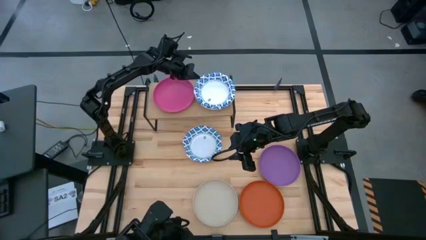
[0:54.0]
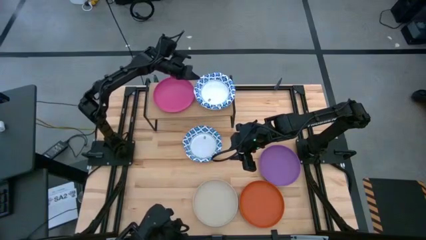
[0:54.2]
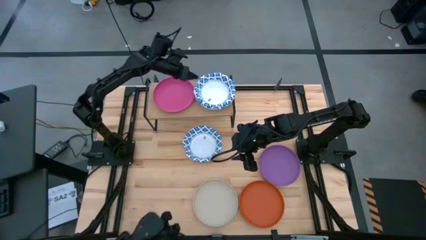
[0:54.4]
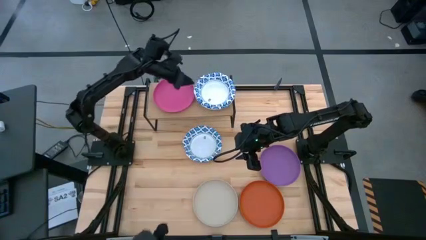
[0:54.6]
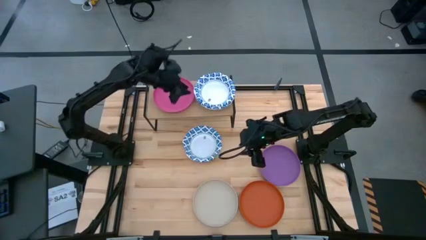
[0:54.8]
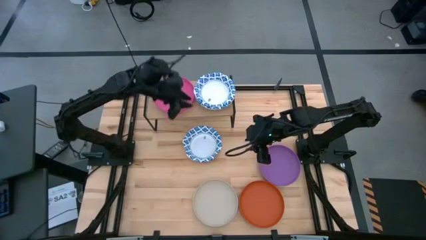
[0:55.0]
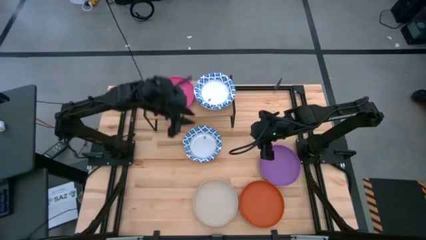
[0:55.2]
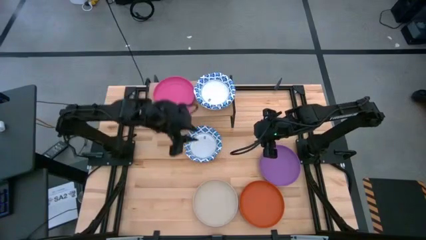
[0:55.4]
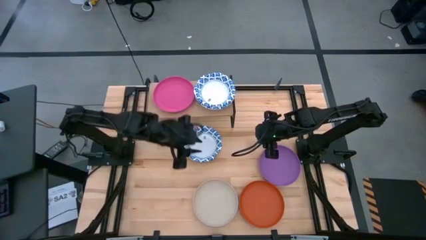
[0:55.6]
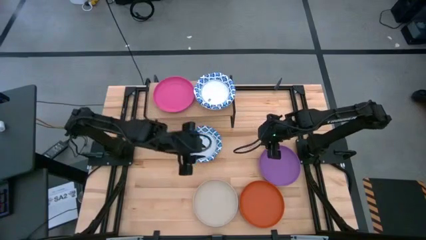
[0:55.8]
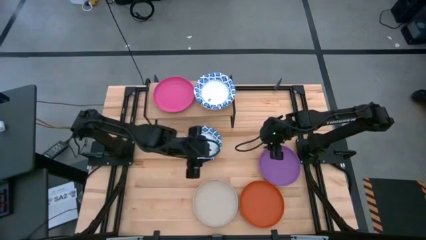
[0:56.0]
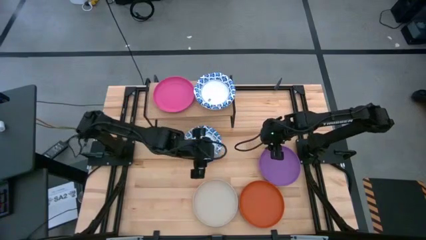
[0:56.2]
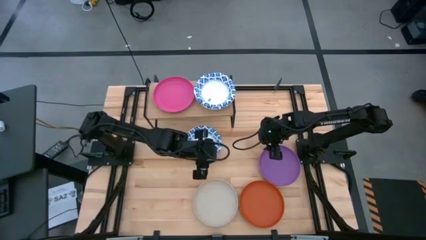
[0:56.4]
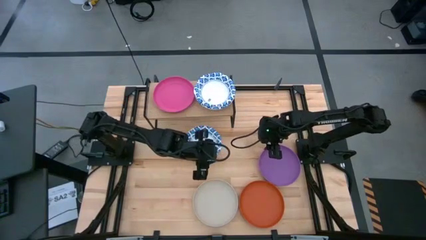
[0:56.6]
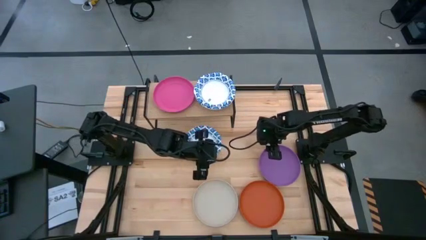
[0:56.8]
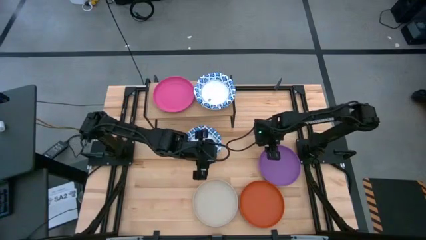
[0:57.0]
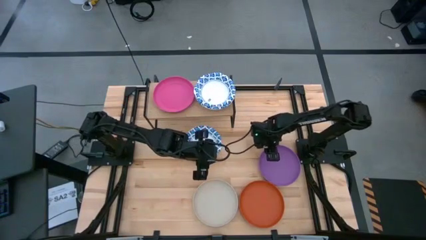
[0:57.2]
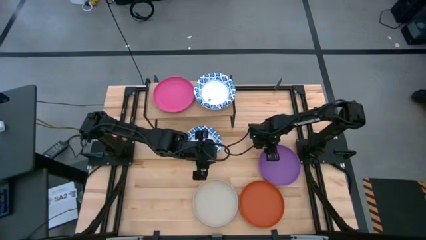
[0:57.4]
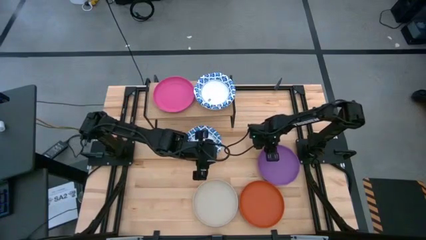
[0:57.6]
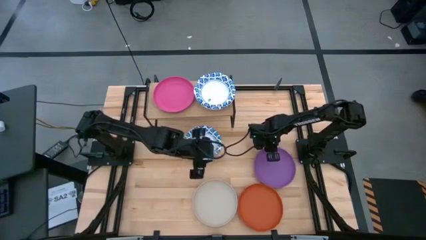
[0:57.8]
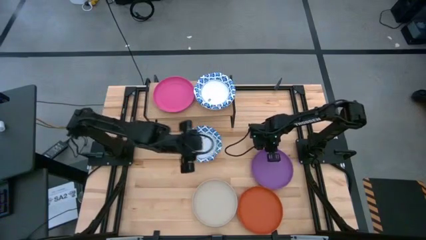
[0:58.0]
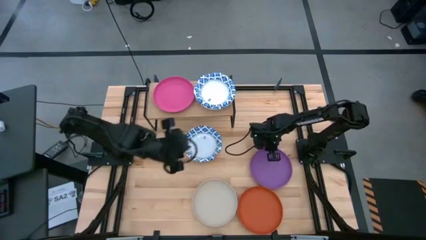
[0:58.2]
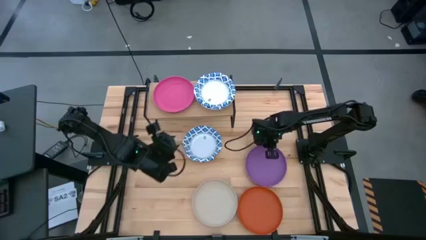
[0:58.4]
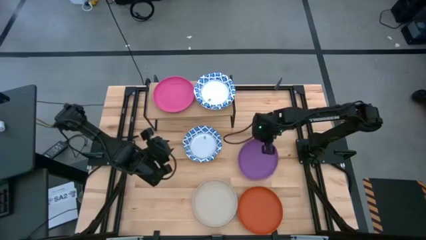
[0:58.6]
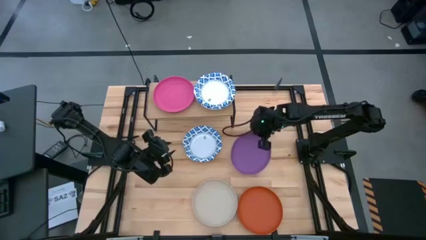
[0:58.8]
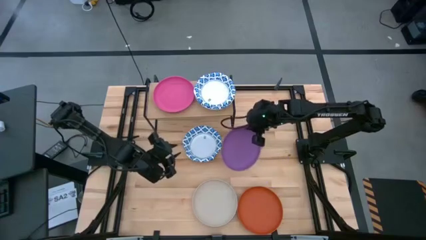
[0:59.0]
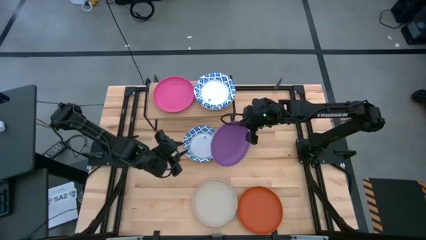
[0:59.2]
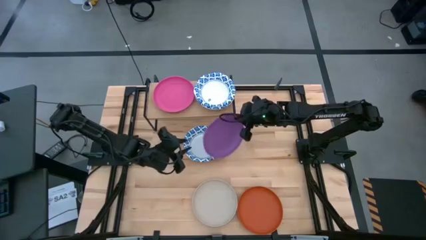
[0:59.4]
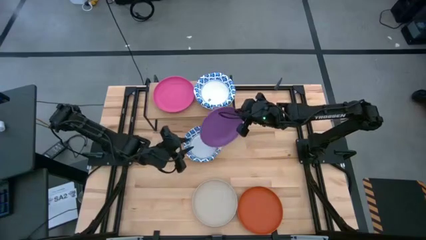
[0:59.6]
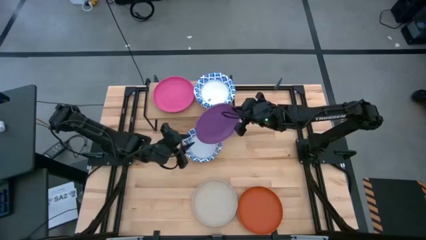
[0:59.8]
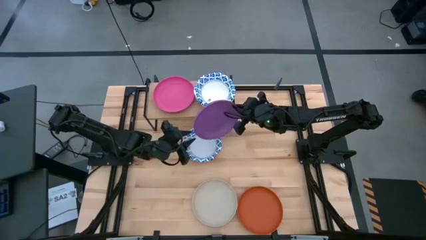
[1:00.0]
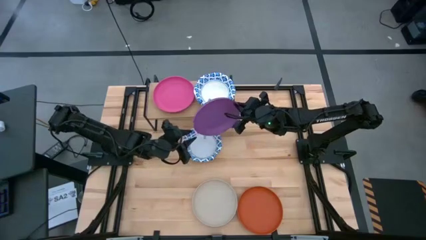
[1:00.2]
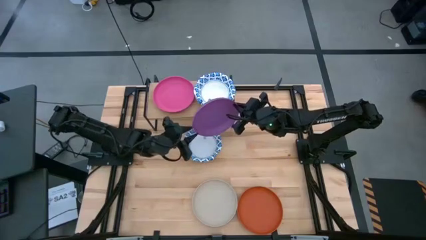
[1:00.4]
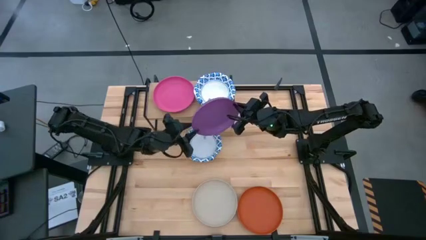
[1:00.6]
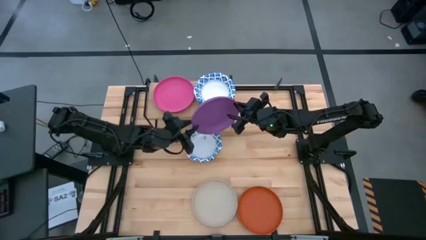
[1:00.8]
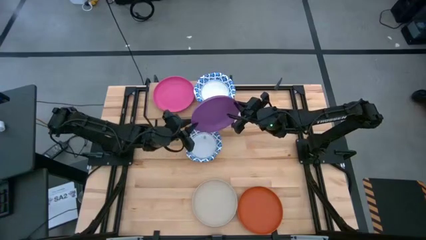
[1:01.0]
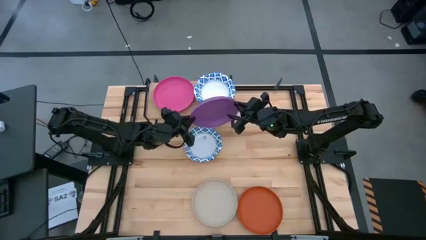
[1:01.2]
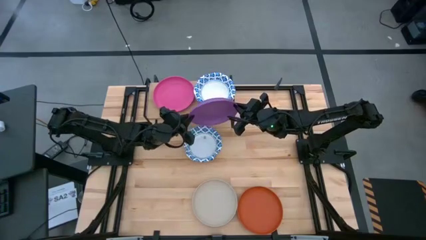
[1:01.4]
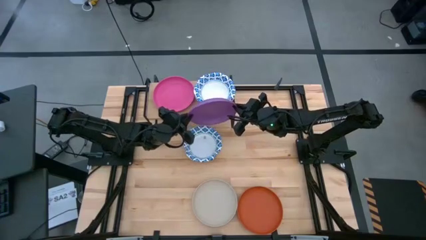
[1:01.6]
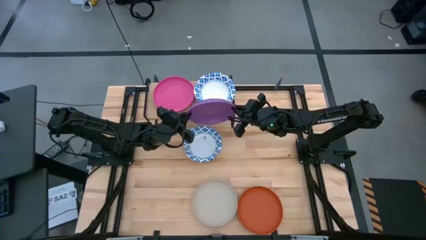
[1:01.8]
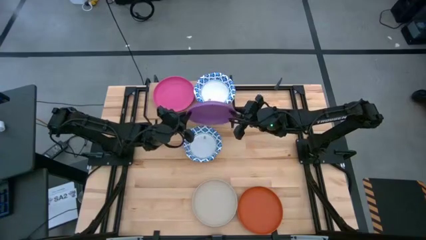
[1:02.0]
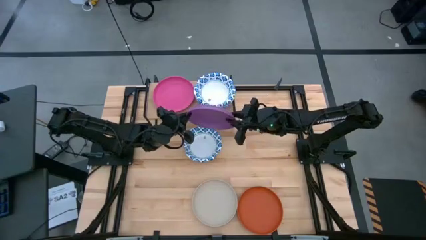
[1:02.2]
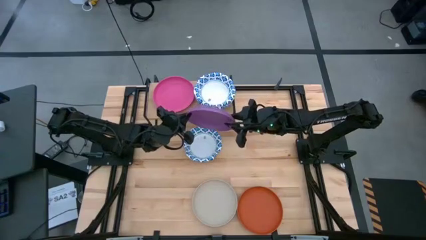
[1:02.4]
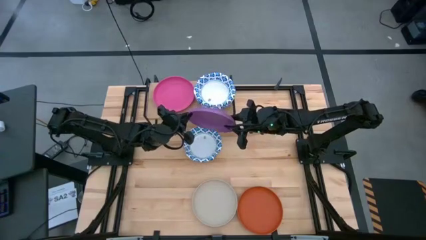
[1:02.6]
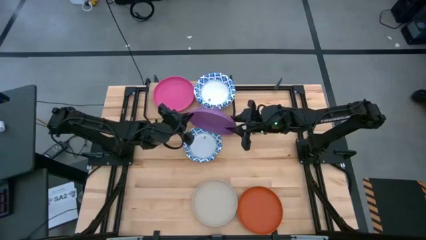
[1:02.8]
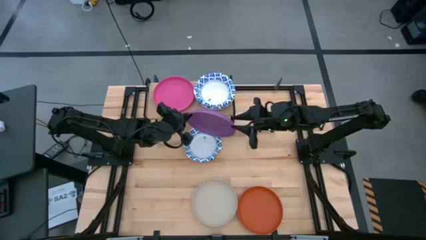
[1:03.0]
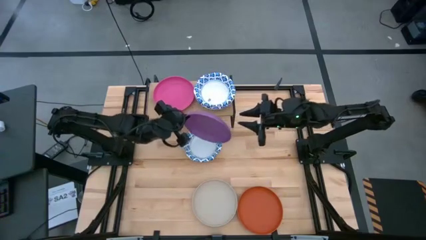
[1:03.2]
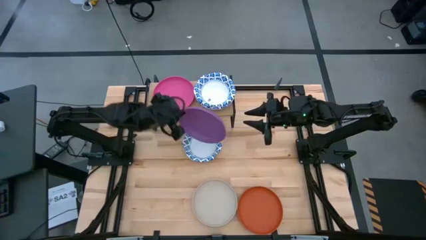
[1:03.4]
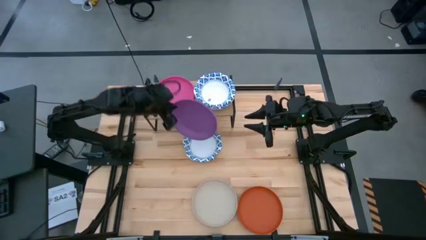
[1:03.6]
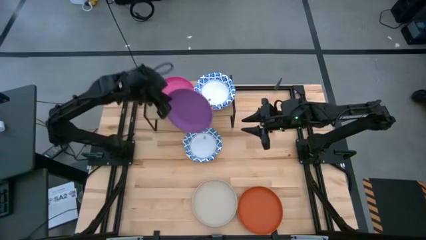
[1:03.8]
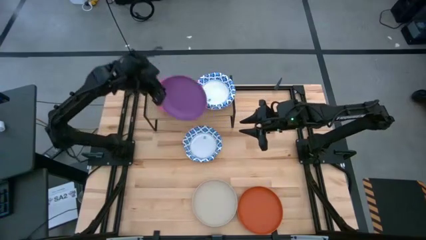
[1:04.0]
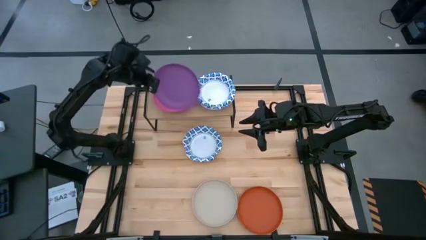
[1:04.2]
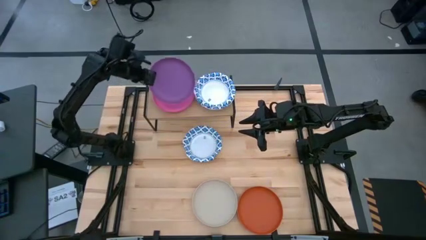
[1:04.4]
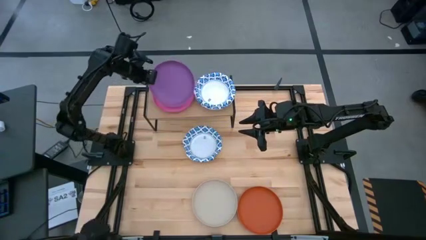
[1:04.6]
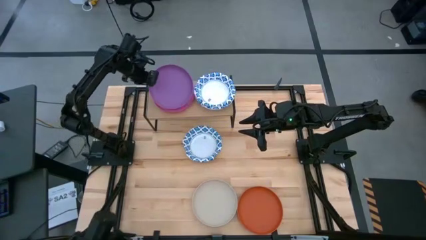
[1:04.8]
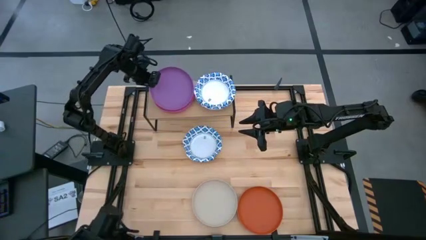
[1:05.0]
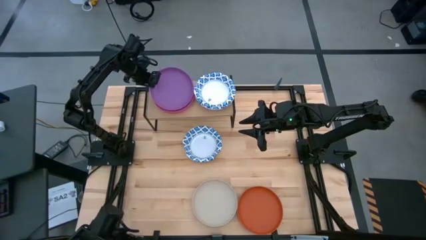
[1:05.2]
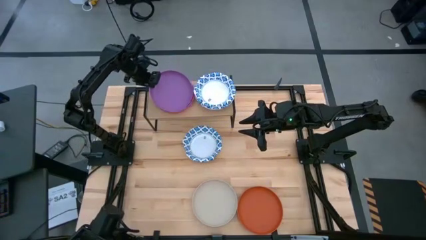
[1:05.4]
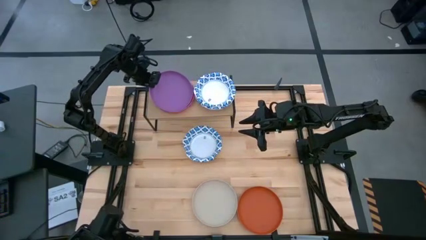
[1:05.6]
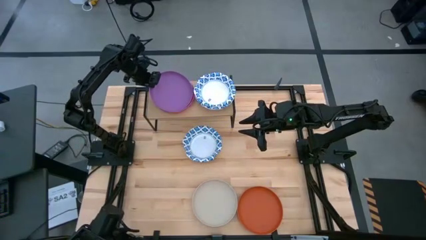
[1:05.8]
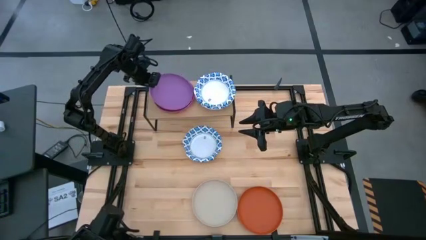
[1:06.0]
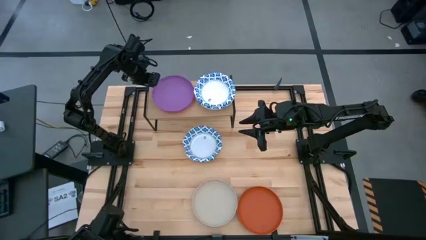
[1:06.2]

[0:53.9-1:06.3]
Task: Place and stack plates onto a shelf
Stack the purple plate on top of the pink plate on the shelf

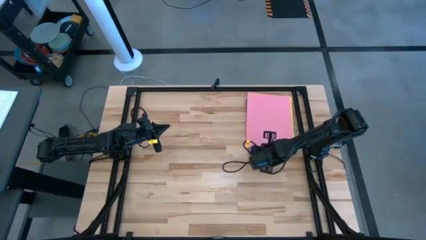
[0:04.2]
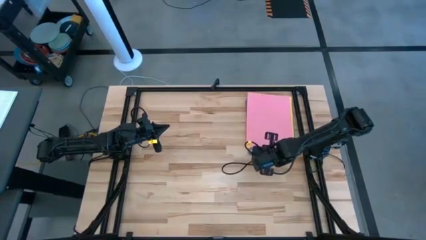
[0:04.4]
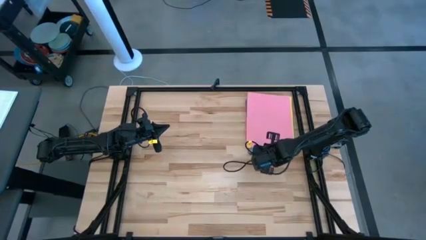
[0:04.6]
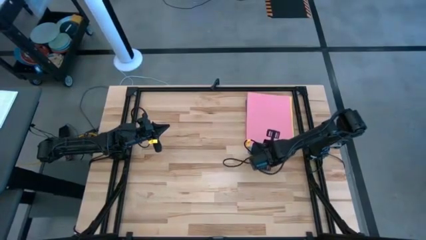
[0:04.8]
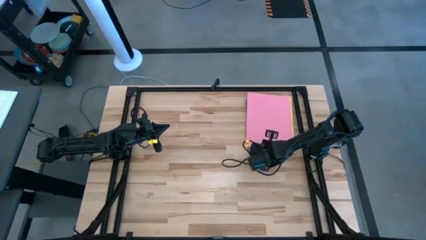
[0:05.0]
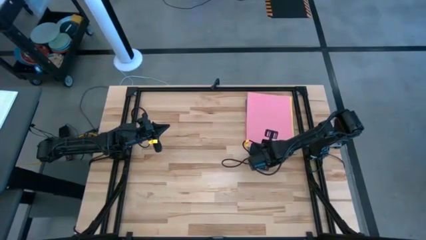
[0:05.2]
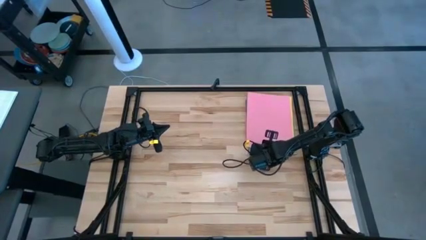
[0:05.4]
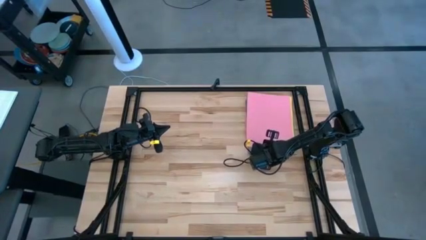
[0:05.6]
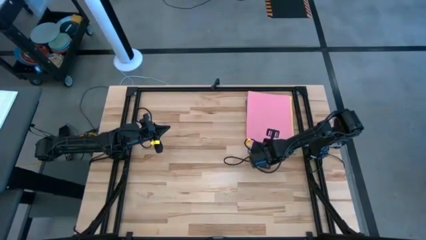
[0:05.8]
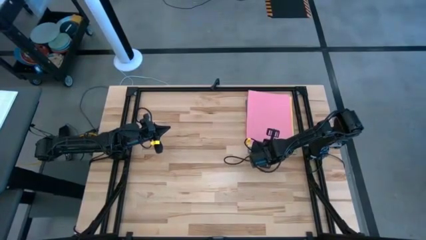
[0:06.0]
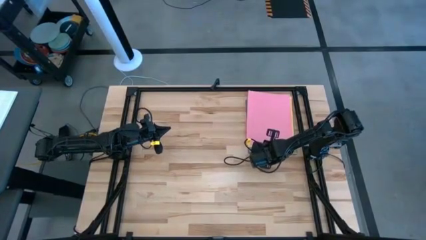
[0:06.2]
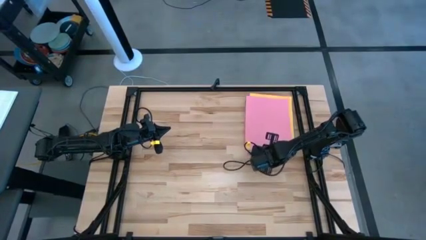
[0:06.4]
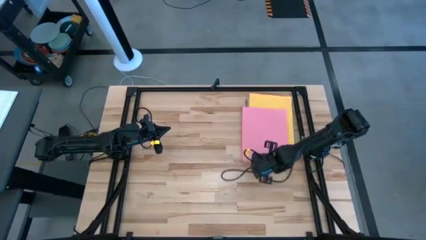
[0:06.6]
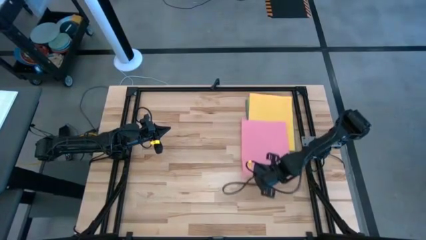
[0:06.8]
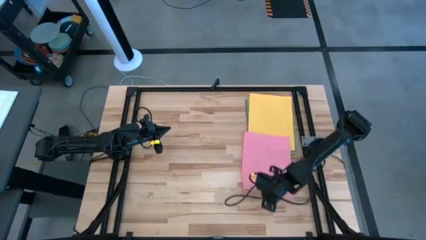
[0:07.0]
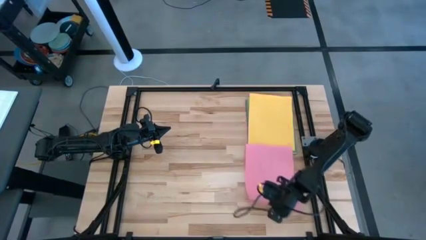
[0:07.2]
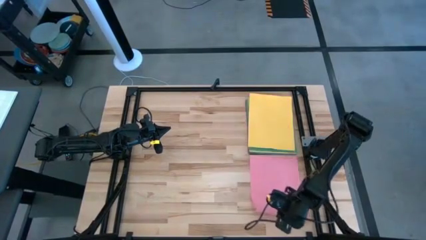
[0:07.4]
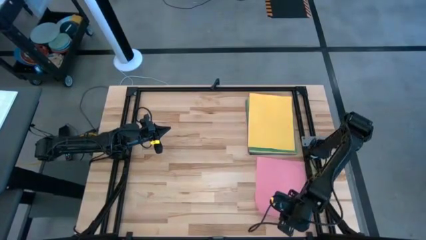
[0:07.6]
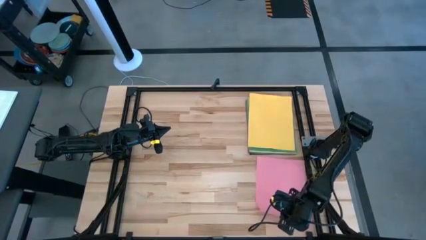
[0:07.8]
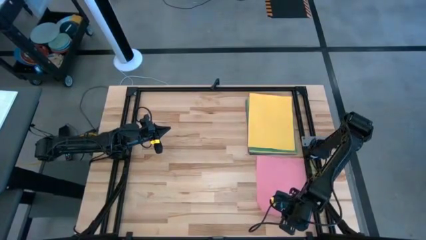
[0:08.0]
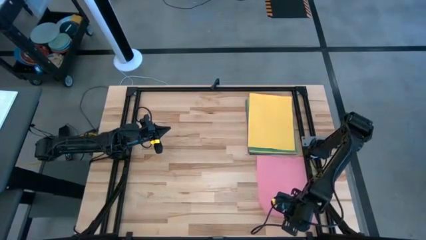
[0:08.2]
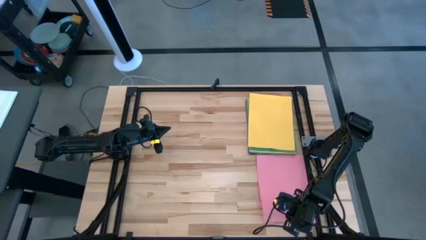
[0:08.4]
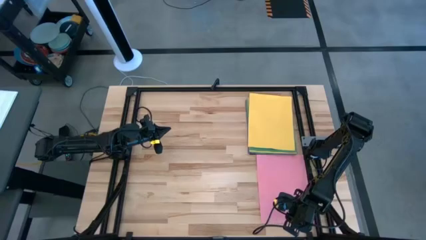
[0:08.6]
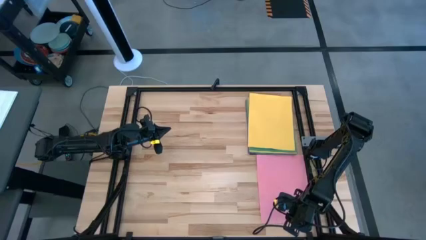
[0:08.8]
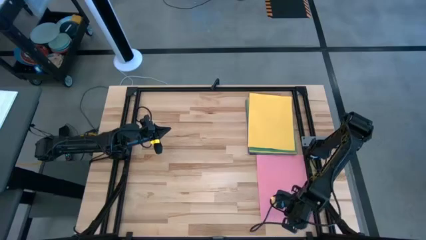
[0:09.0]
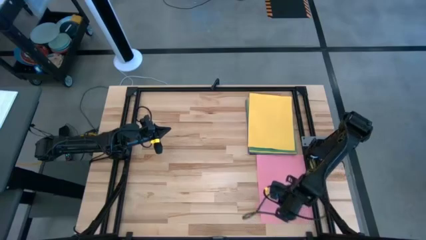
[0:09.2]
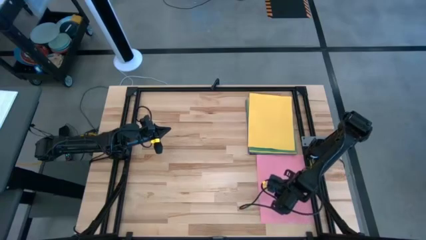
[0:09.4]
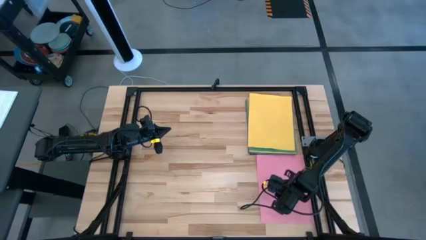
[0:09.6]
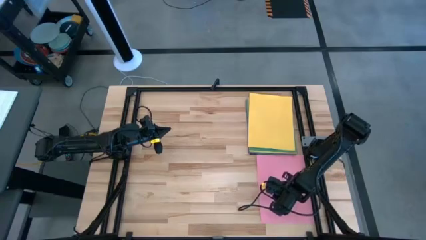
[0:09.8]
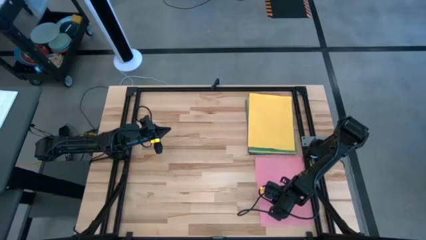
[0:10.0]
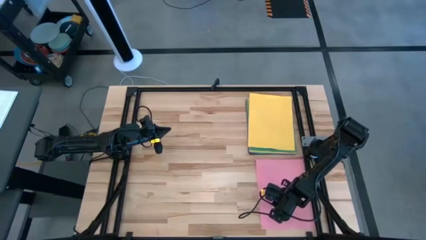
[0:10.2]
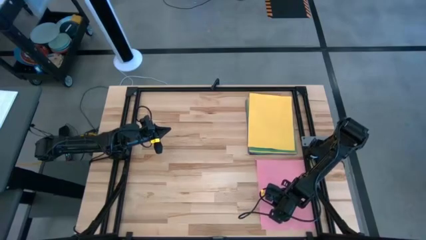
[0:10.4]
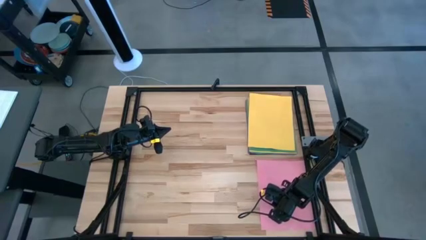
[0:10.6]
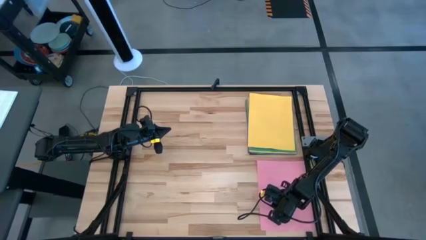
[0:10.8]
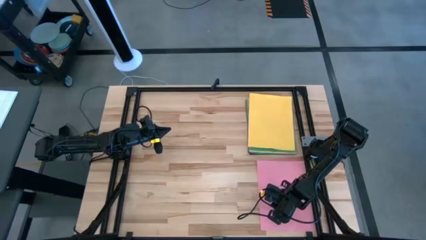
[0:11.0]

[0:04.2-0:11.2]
Task: Organize paper
Move the pink paper to the bottom right of the table
